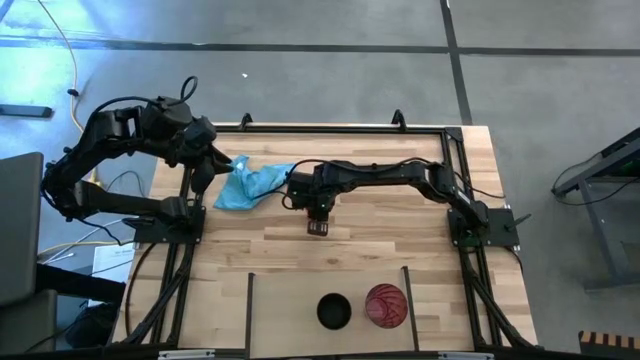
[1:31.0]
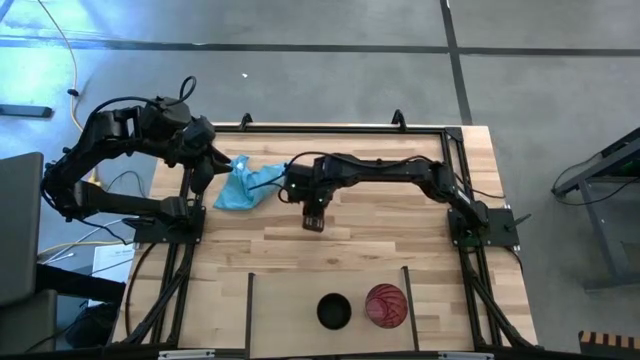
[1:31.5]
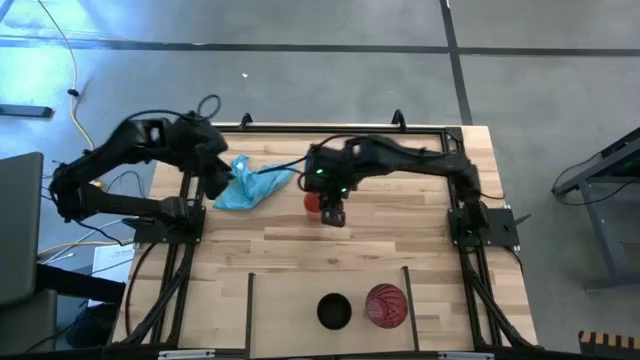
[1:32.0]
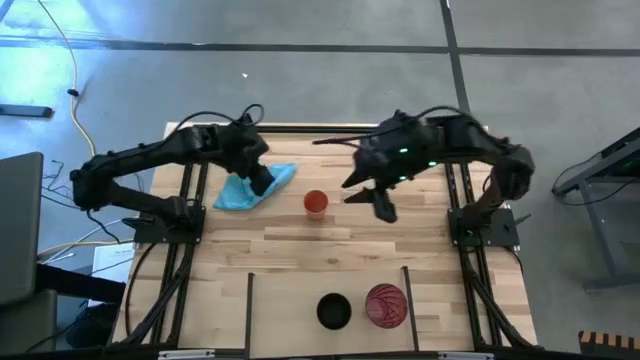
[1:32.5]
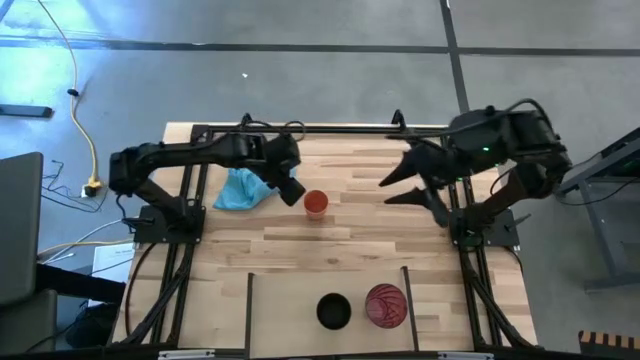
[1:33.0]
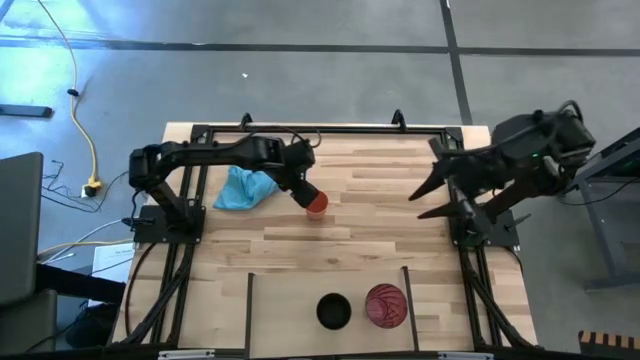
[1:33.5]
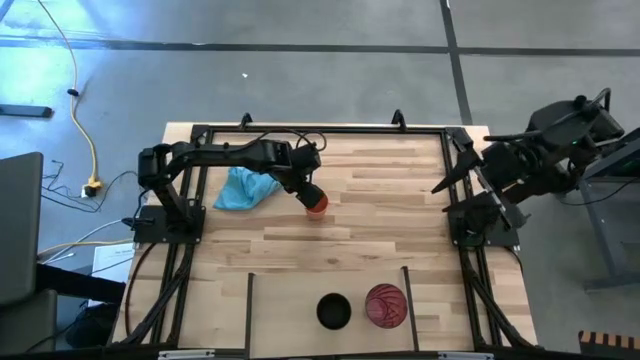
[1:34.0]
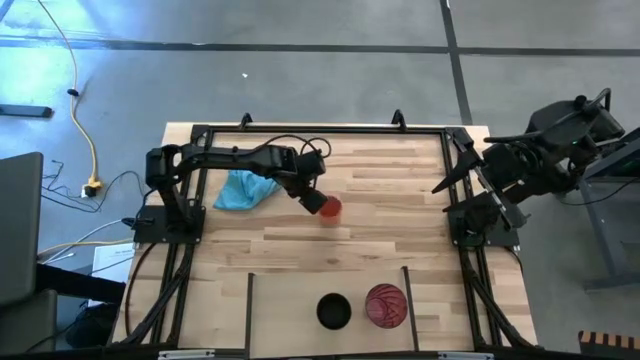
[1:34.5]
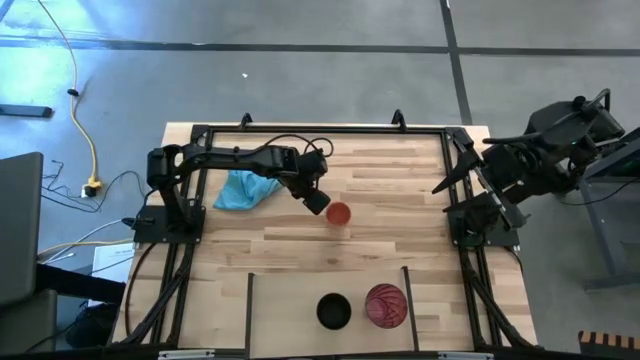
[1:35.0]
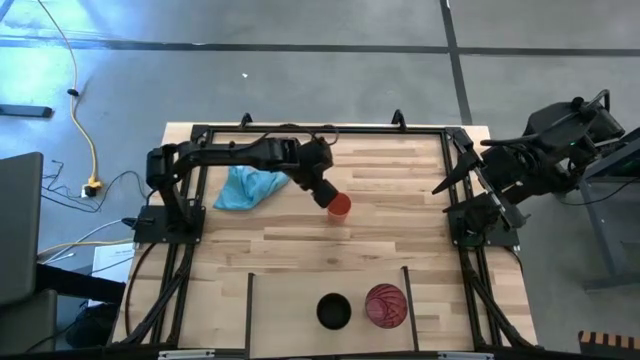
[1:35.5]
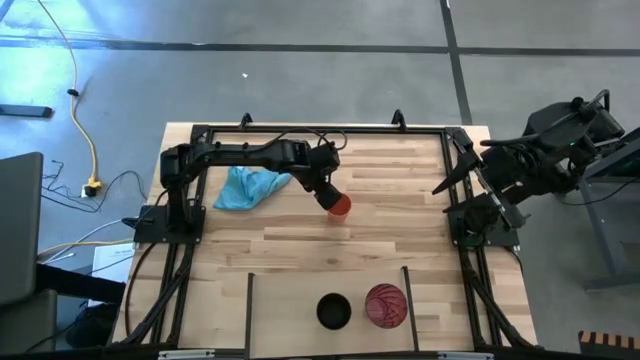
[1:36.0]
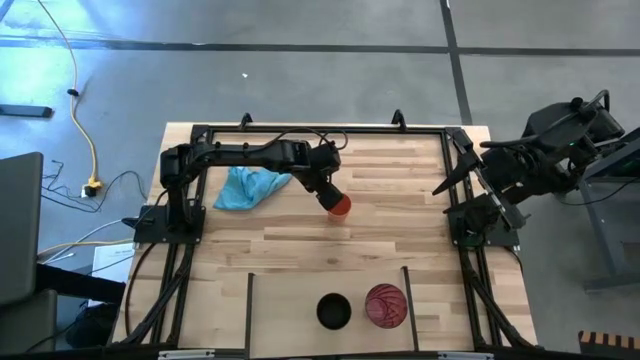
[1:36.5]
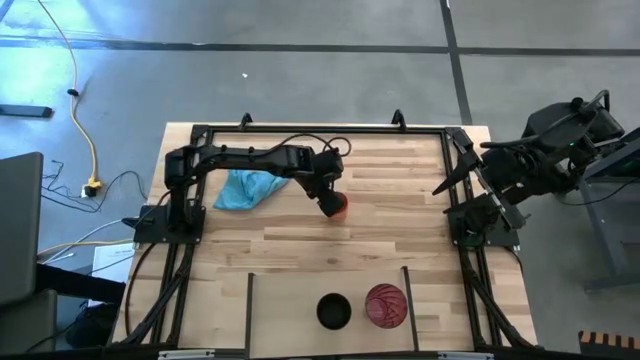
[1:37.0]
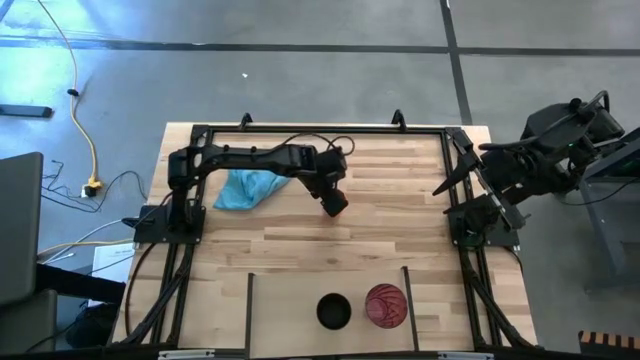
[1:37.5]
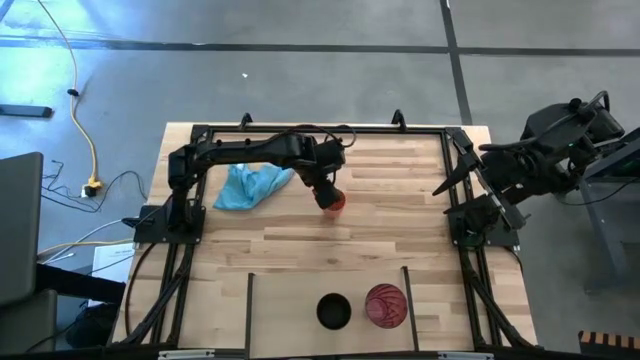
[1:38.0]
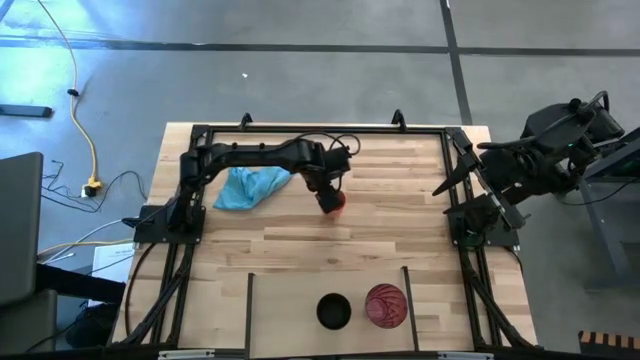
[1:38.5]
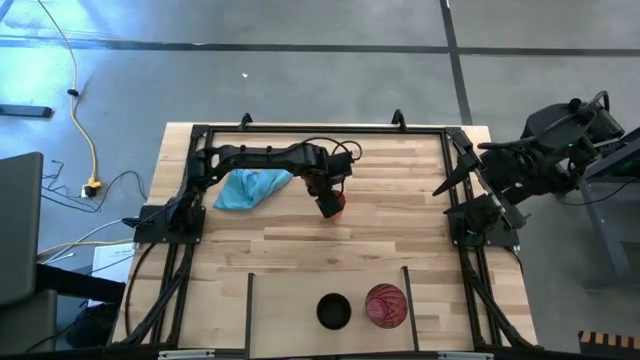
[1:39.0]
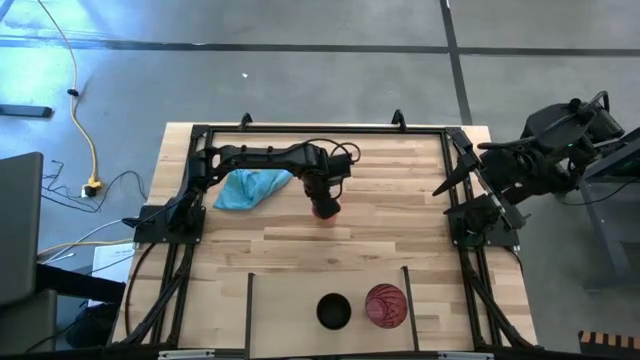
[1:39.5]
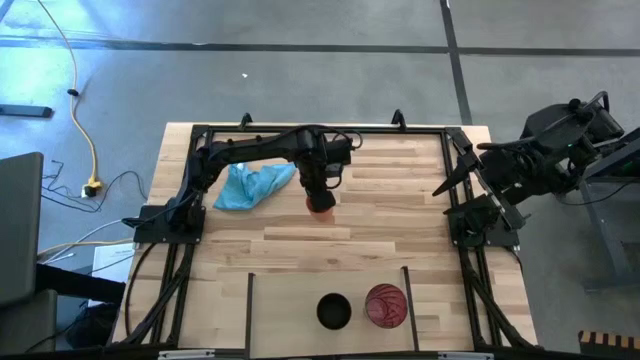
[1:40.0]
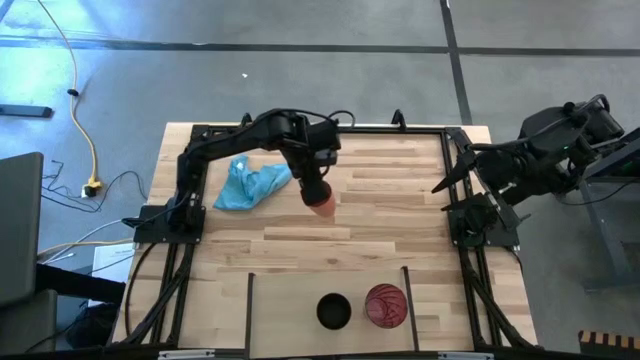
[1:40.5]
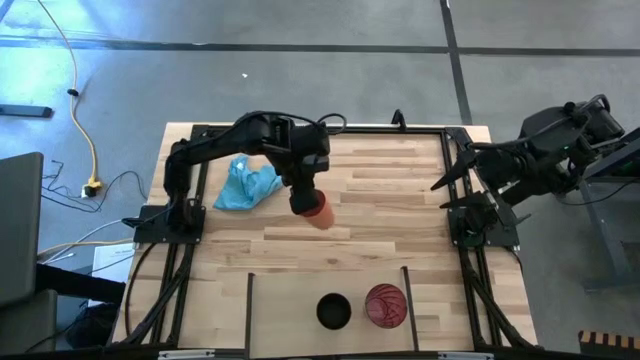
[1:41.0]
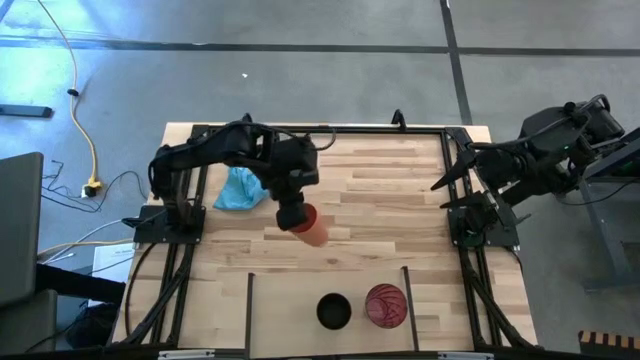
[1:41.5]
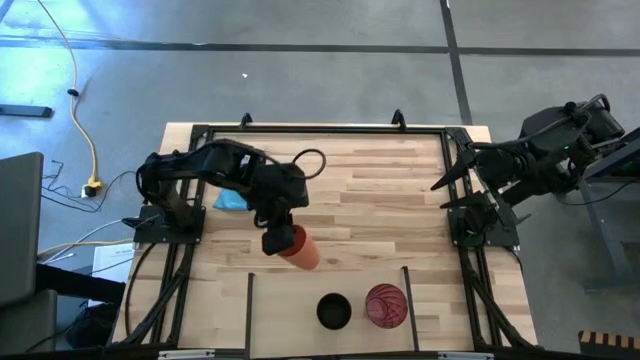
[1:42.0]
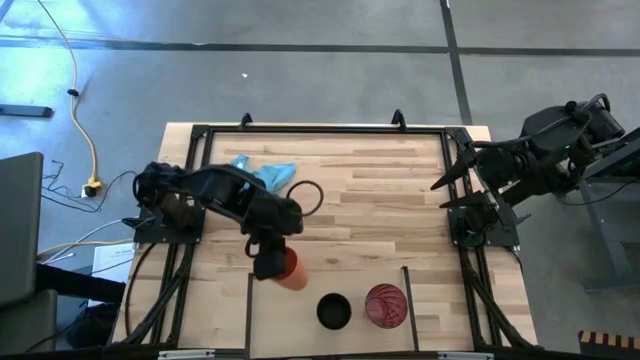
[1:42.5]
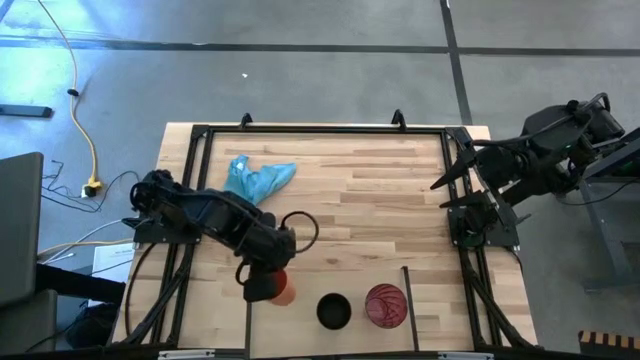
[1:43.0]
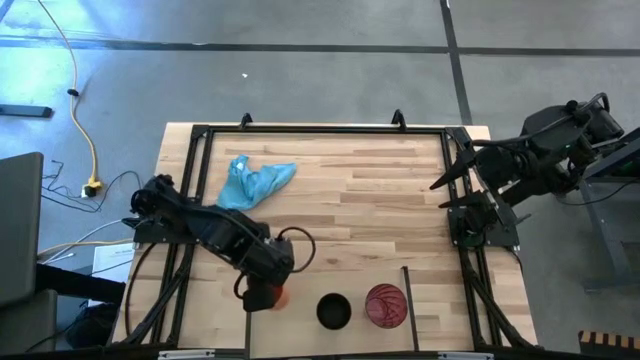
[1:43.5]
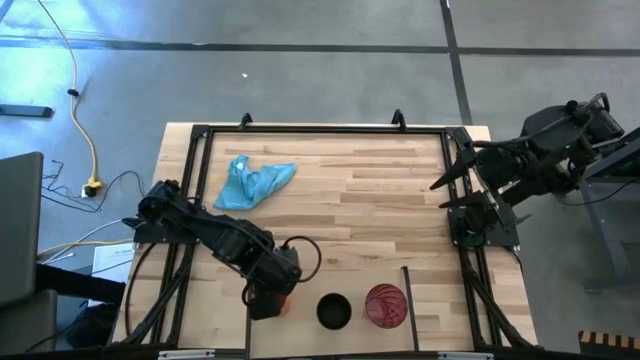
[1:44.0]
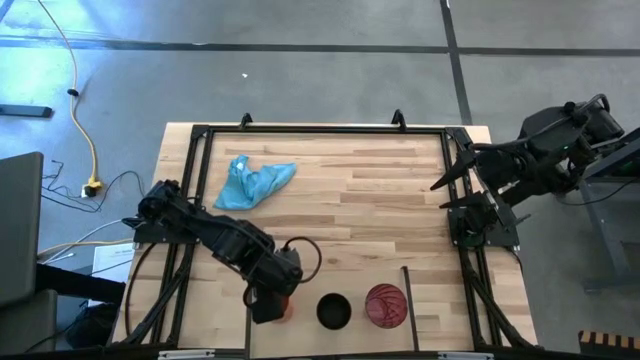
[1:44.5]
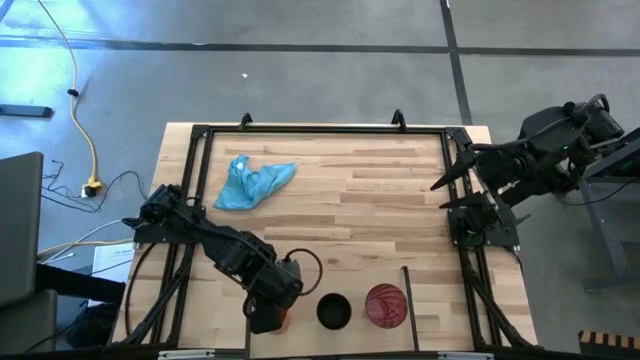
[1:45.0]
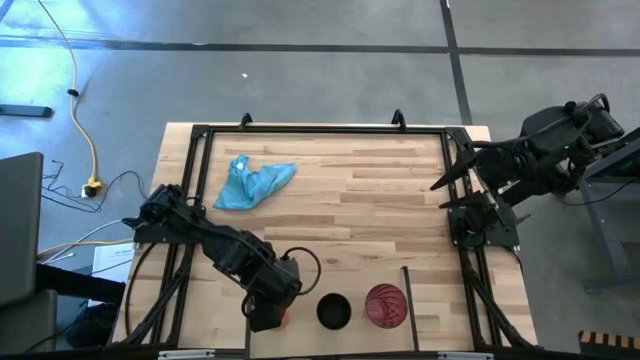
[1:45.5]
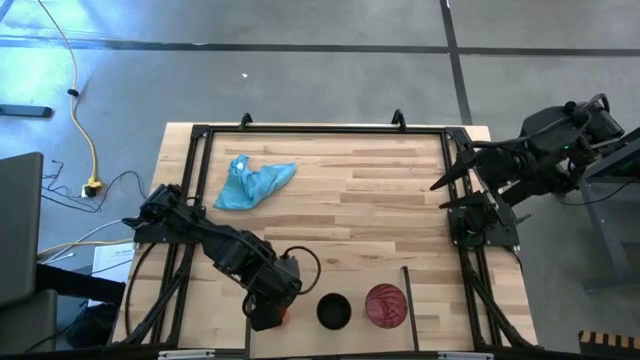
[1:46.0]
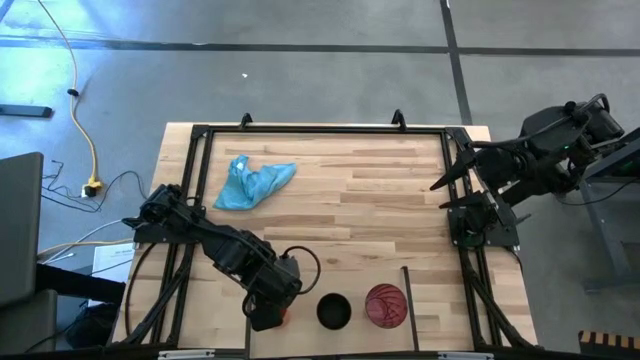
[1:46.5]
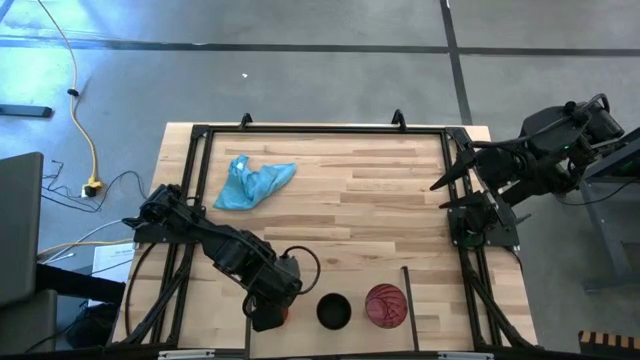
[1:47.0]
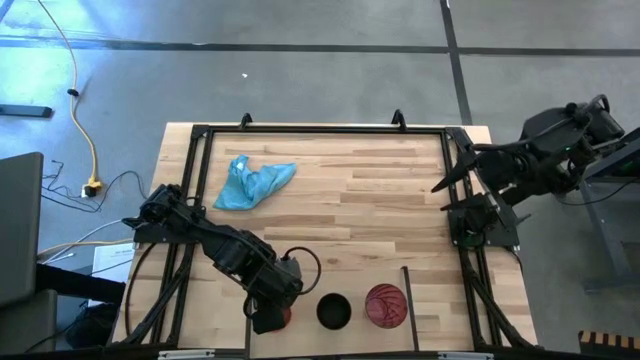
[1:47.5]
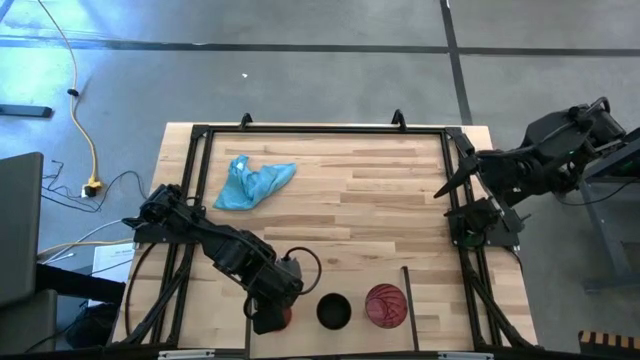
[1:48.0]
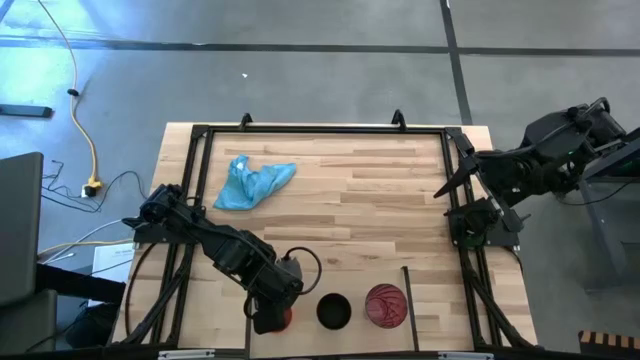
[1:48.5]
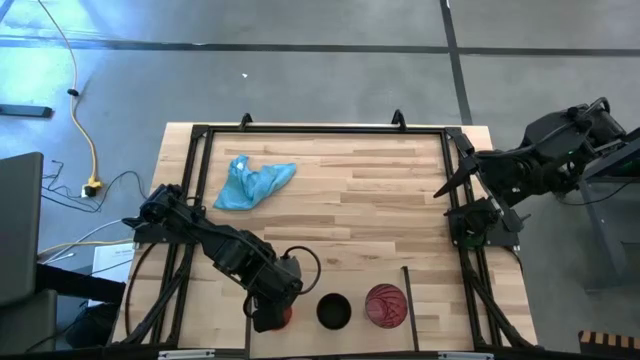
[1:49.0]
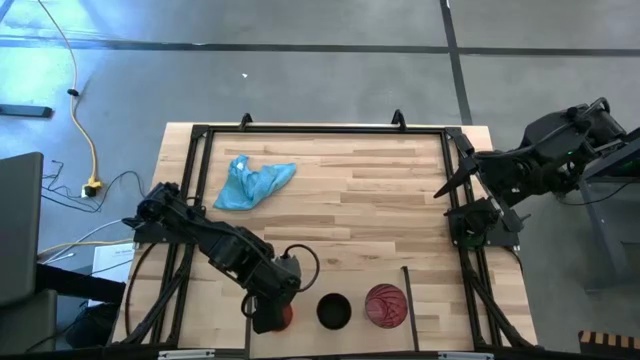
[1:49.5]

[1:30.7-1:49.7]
Task: Stack small to large cups/mugs on shelf
Put the orange cup on the shelf

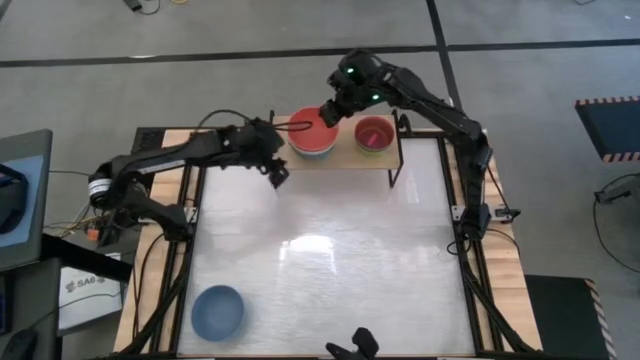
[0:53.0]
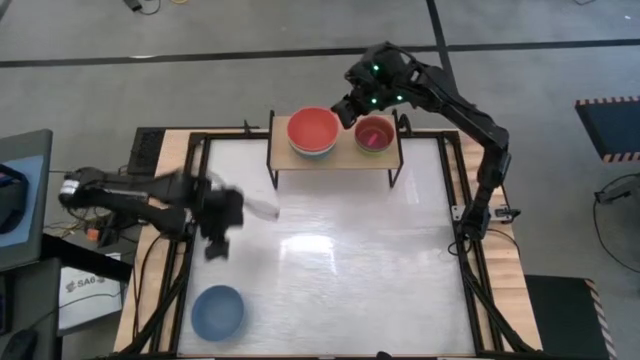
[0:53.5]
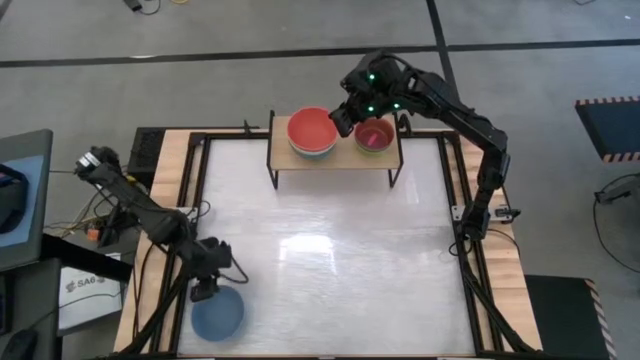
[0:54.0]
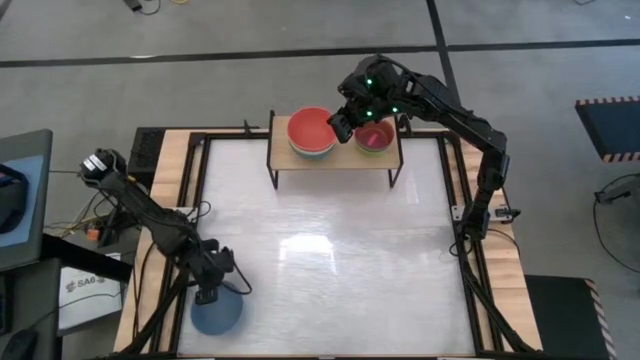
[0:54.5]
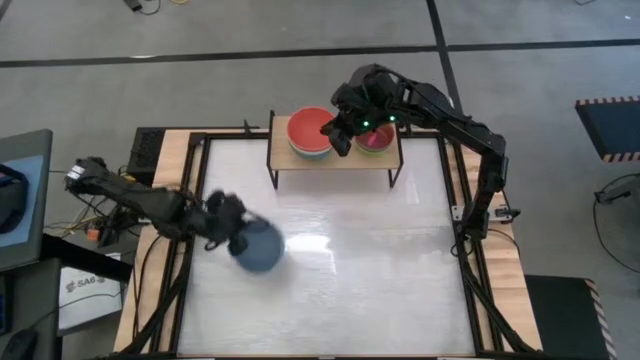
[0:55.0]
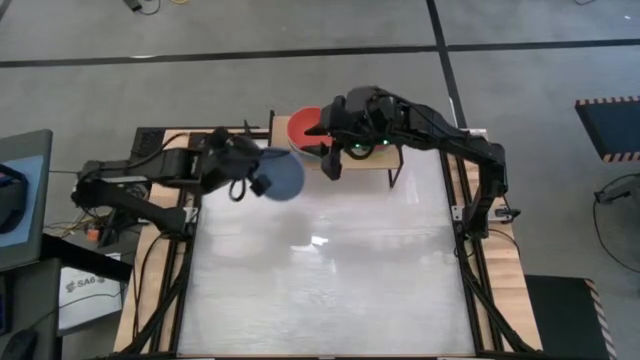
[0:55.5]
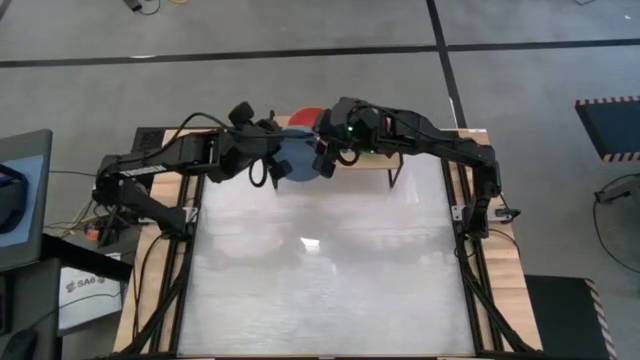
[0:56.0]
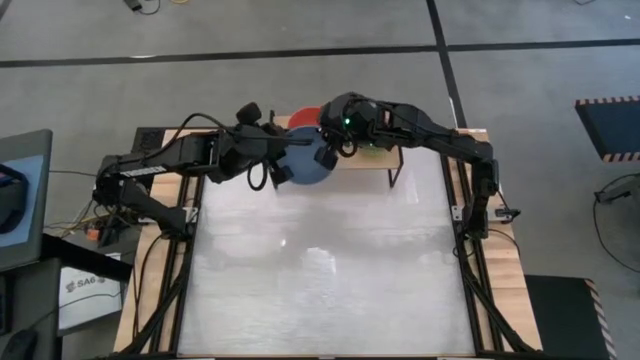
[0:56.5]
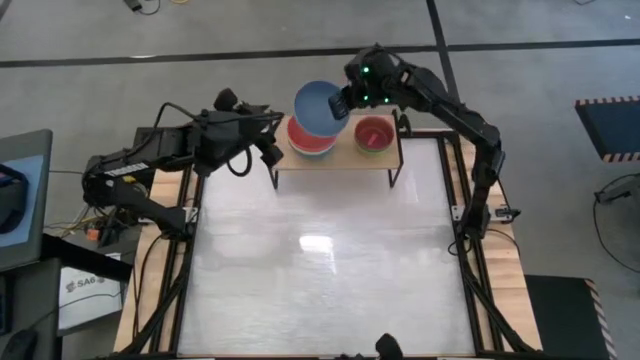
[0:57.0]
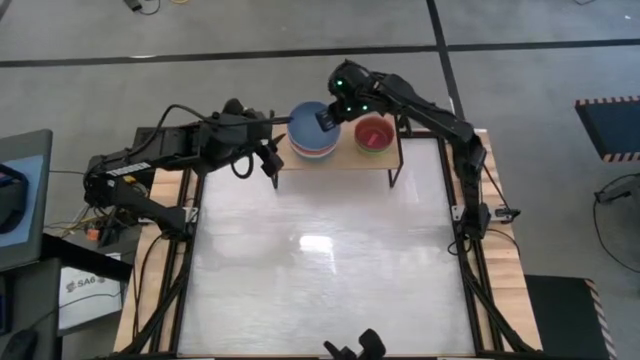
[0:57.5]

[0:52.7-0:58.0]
Task: Place and stack bowls onto a shelf
Stack the blue bowl on top of the orange bowl on the shelf
